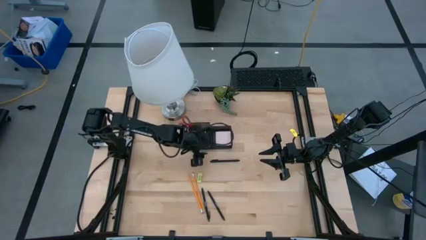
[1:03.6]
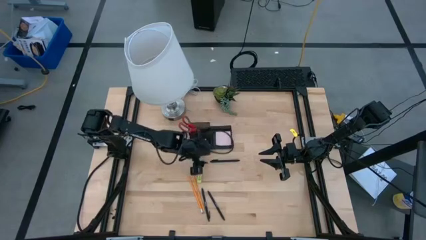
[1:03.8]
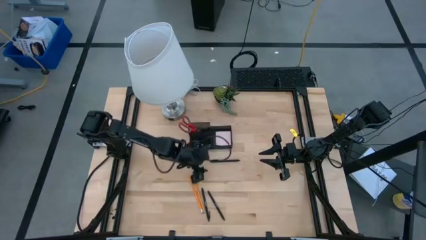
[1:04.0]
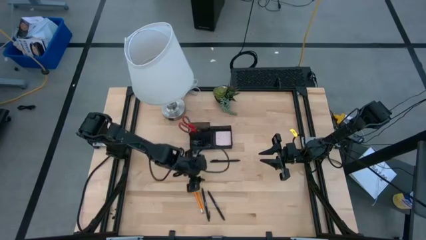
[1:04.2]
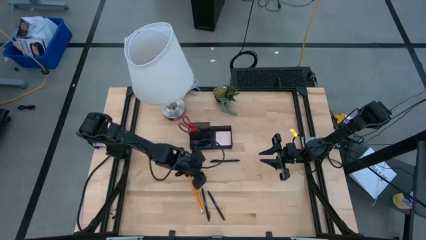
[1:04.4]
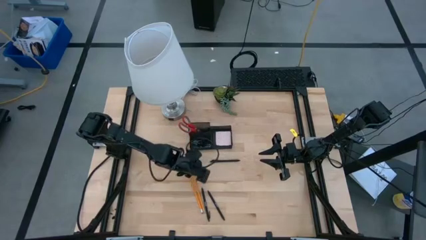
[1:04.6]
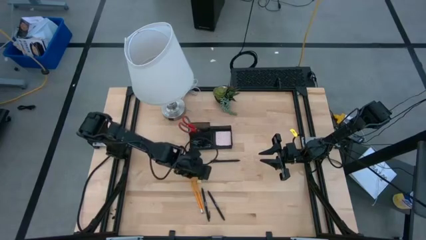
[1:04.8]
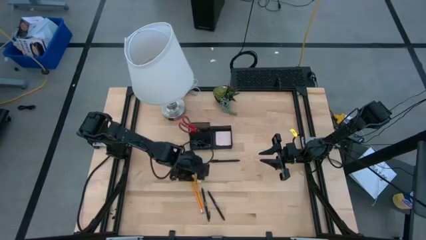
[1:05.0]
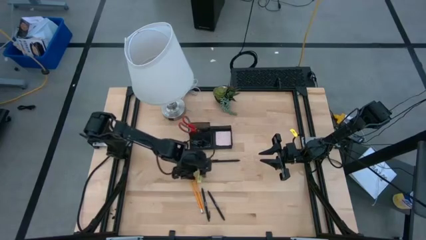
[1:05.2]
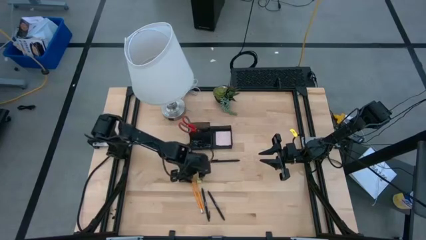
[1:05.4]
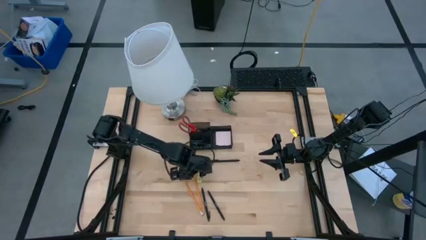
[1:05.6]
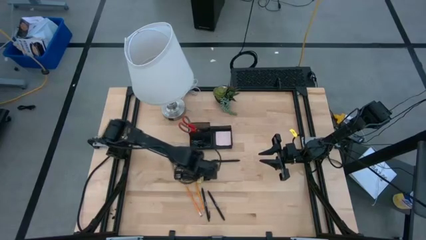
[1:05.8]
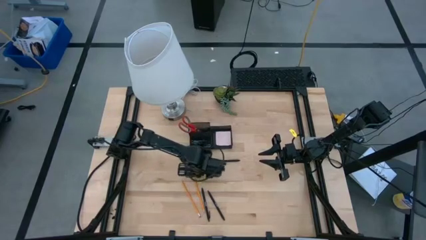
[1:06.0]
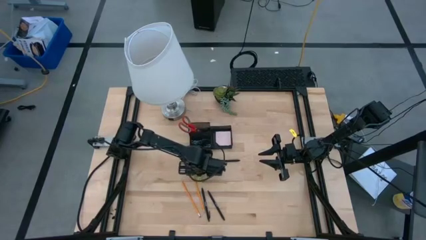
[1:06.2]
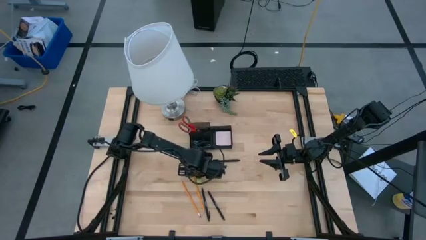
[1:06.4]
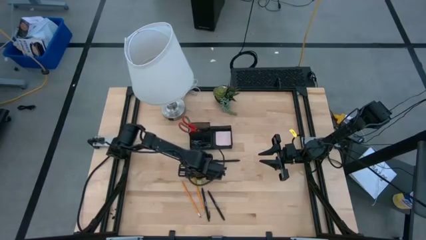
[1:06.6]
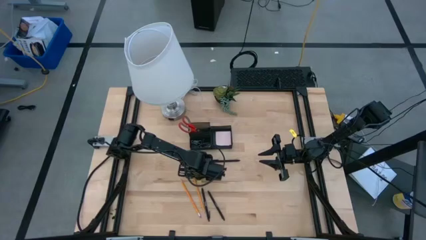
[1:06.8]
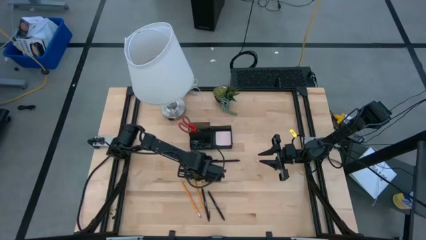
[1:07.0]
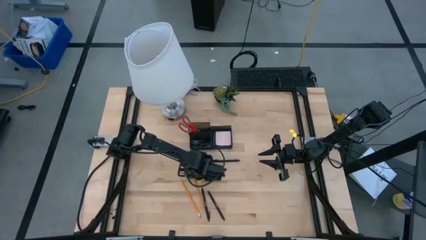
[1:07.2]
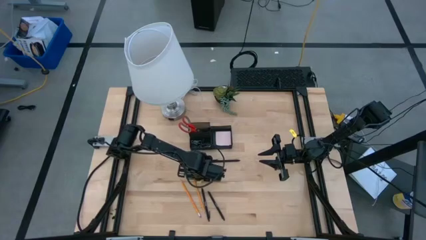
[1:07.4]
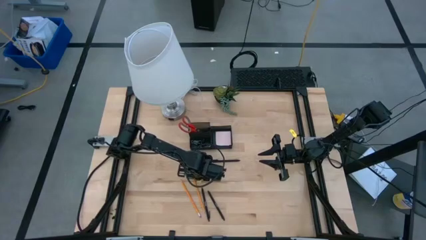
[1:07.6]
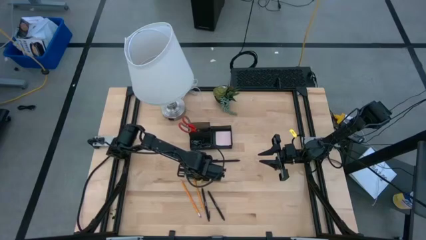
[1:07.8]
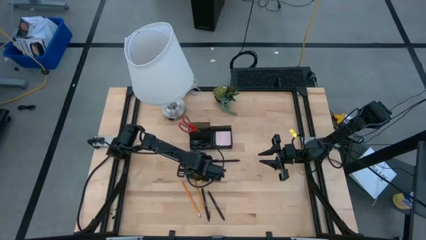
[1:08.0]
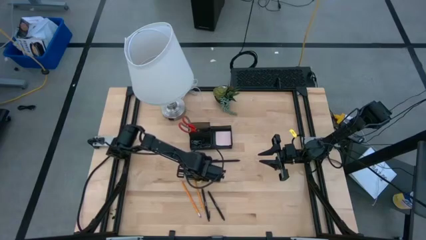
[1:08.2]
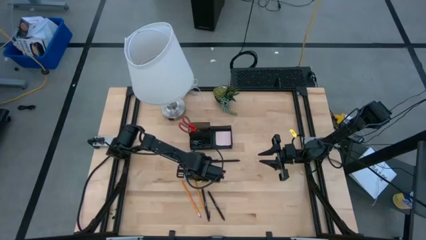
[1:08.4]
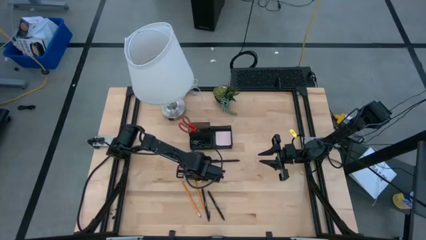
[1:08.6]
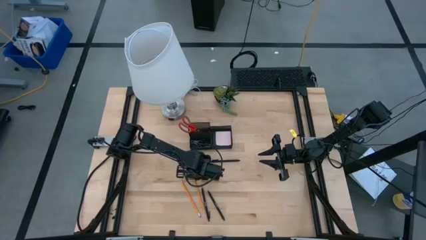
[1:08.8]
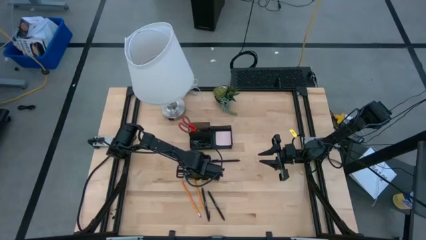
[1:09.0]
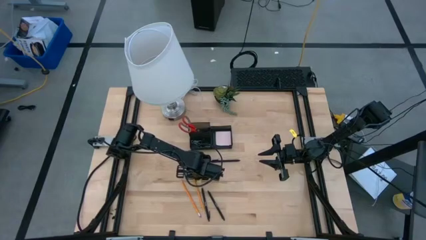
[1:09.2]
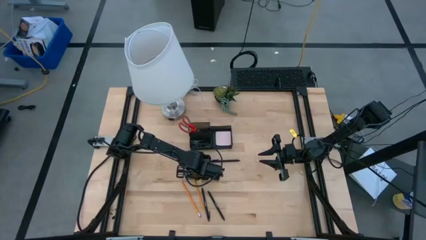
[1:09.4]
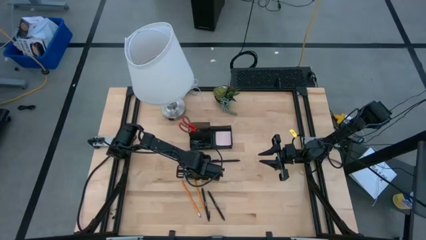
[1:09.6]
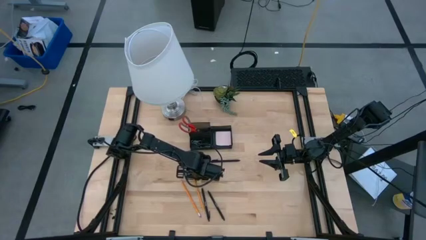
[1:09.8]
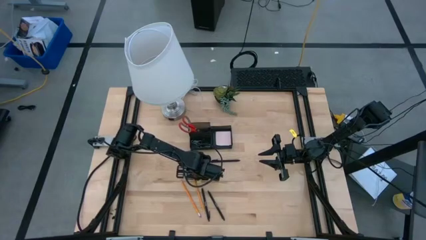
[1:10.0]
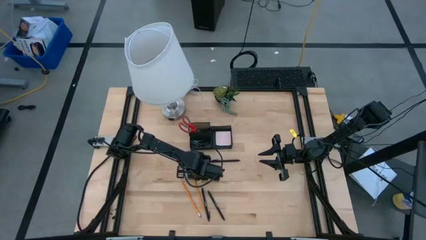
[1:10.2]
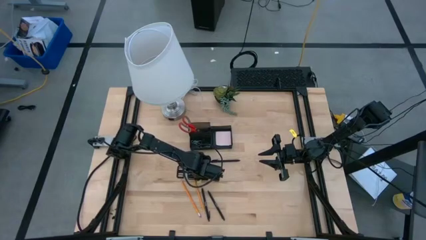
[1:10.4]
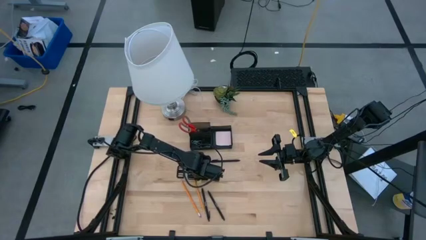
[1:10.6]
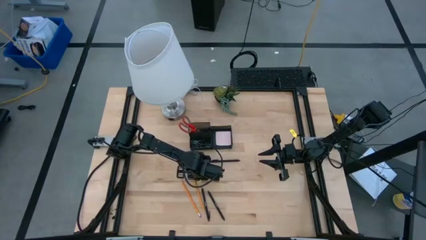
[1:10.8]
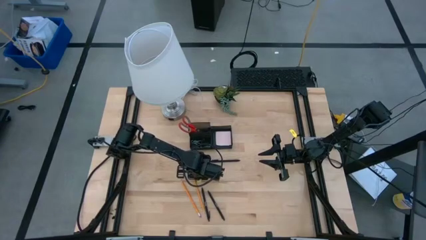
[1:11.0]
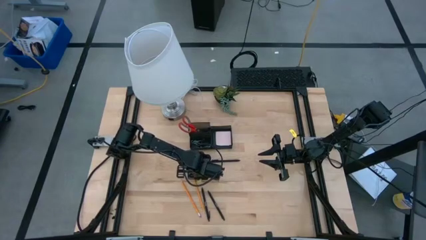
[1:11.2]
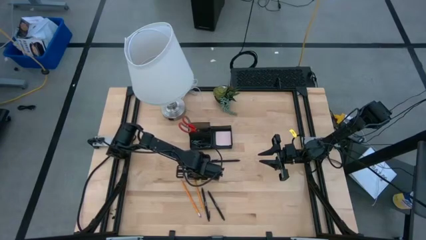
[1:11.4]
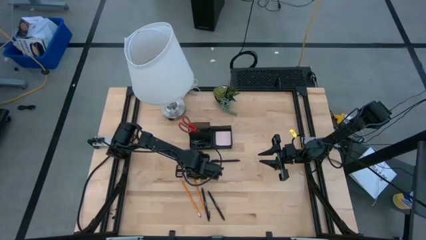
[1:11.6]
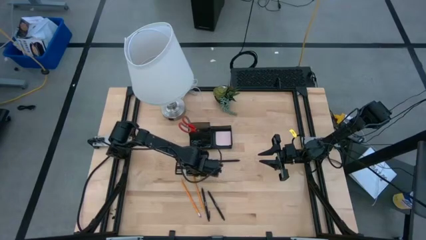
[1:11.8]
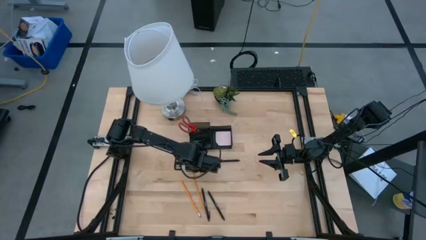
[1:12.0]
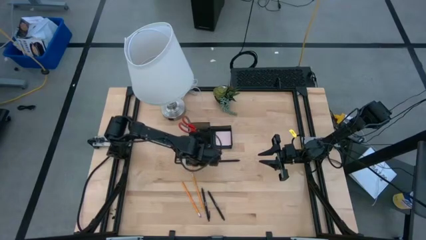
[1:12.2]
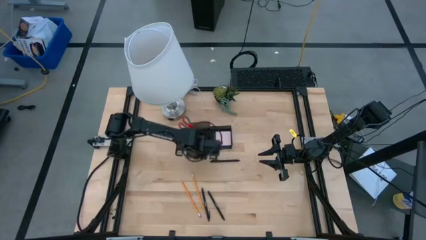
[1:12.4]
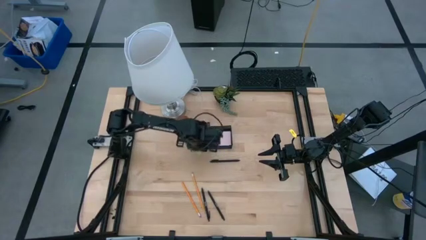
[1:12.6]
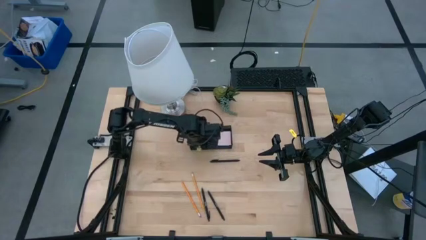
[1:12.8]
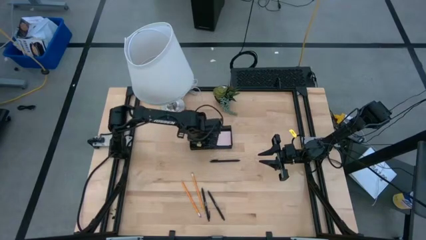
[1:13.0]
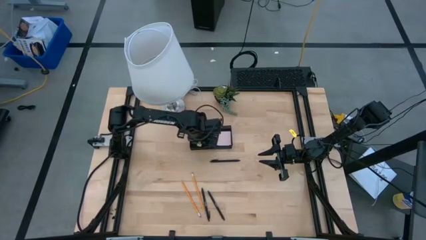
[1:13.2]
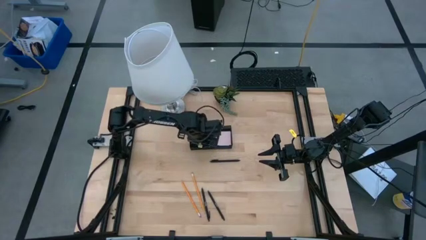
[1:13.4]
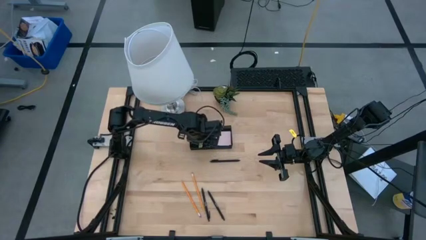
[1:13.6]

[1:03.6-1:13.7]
Task: Pick and place office supplies into organizer
Put the eraser into the black desk organizer
